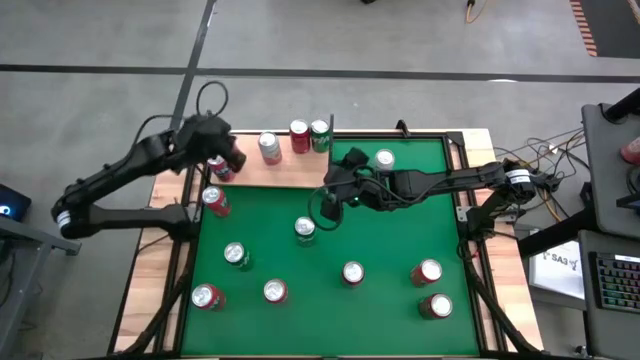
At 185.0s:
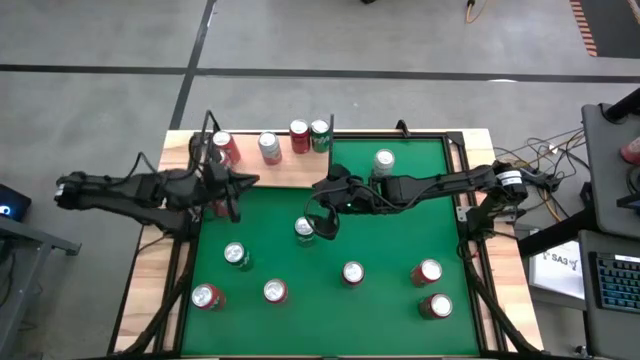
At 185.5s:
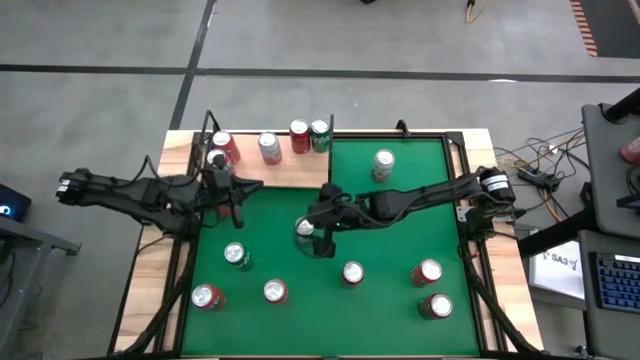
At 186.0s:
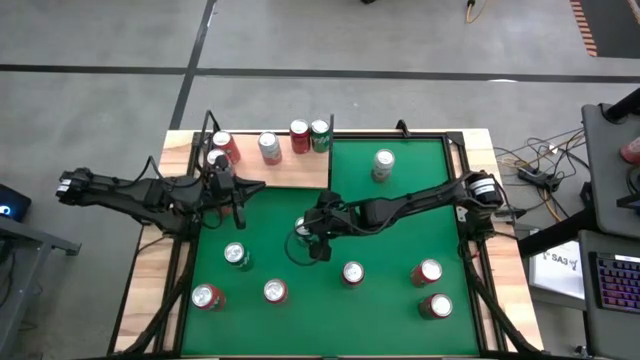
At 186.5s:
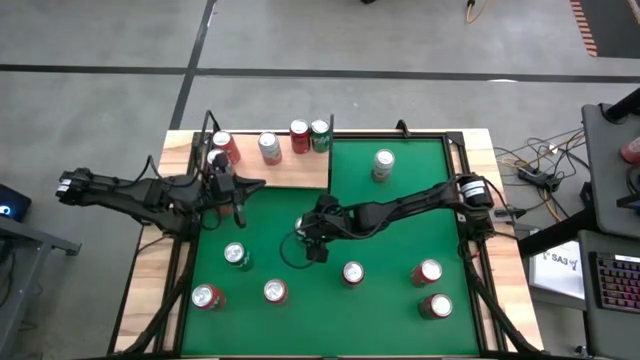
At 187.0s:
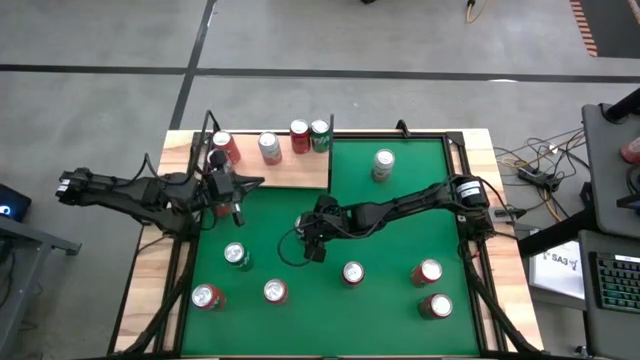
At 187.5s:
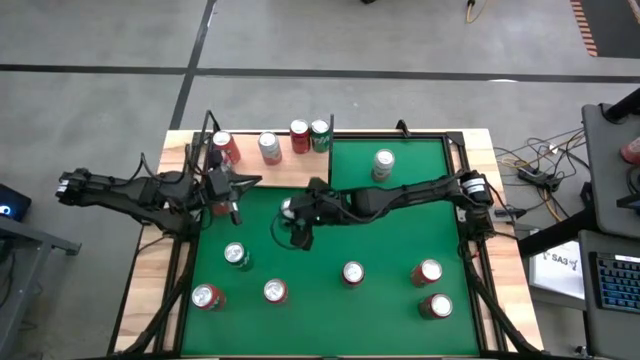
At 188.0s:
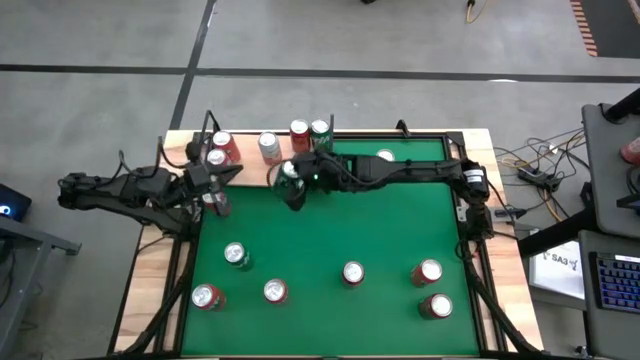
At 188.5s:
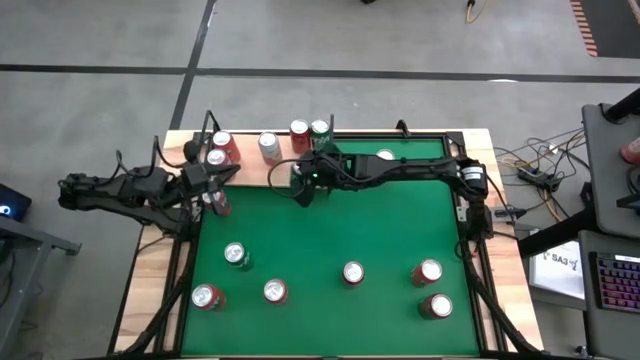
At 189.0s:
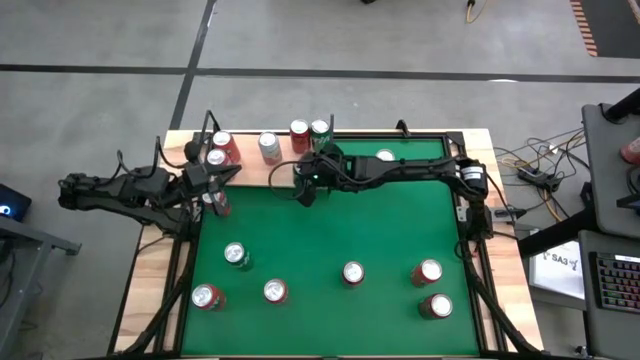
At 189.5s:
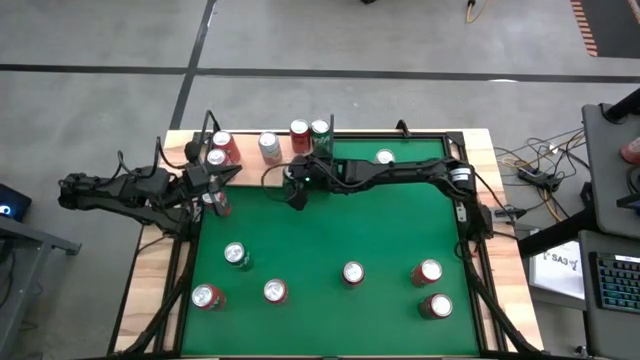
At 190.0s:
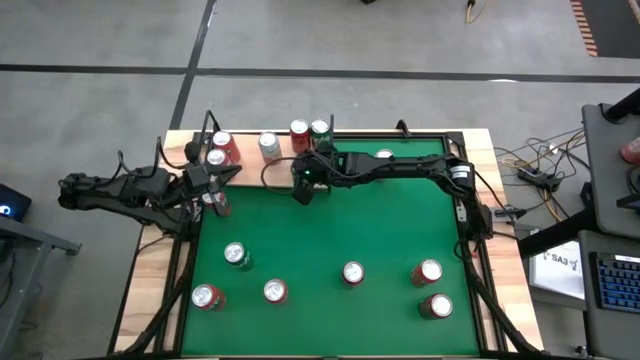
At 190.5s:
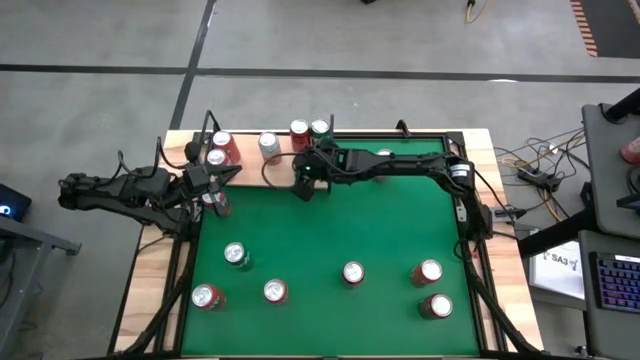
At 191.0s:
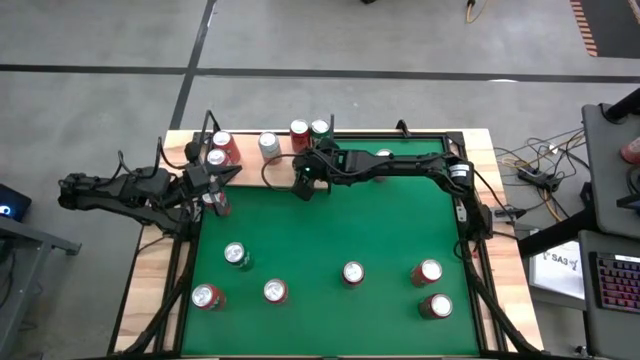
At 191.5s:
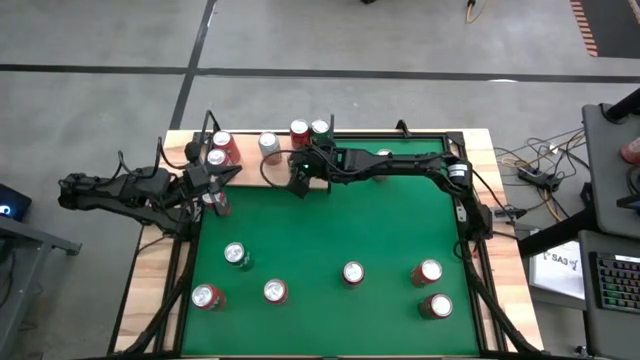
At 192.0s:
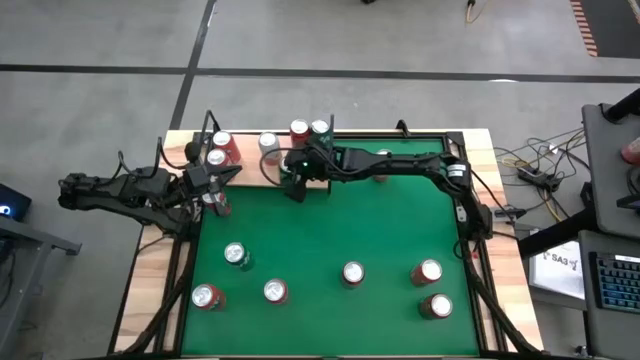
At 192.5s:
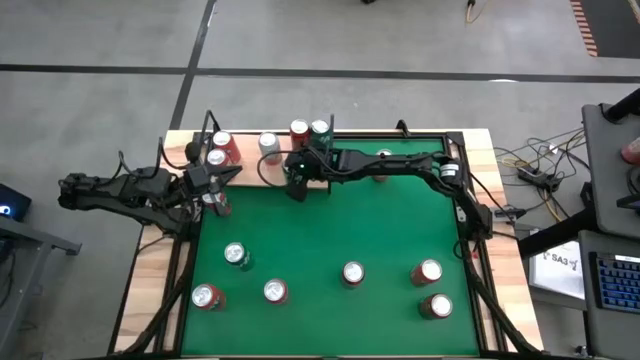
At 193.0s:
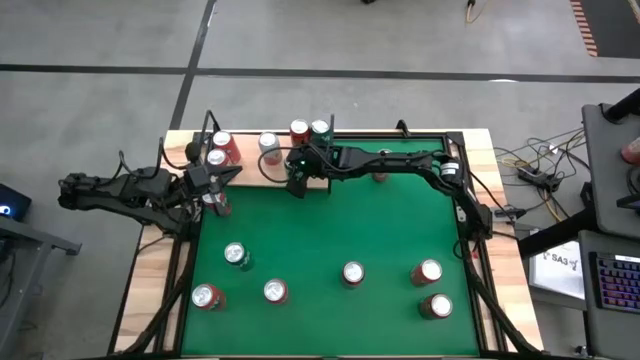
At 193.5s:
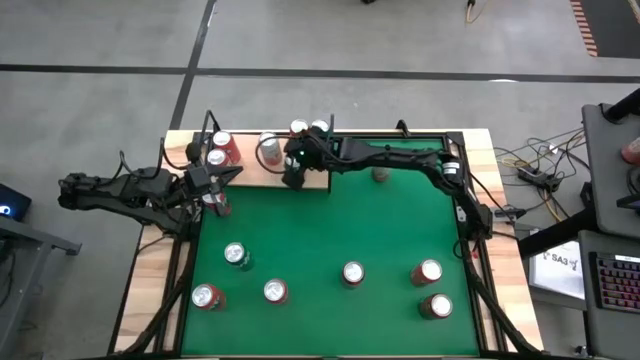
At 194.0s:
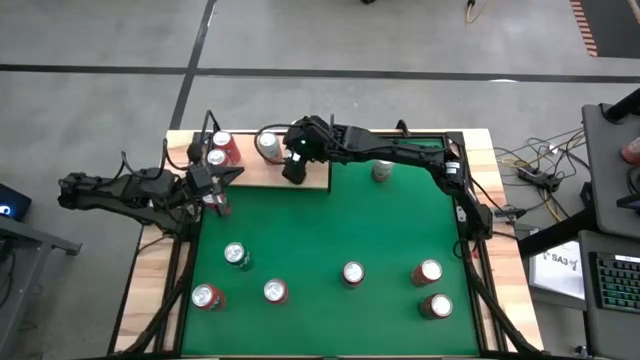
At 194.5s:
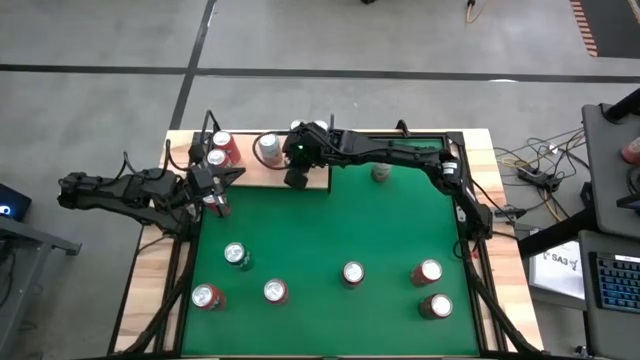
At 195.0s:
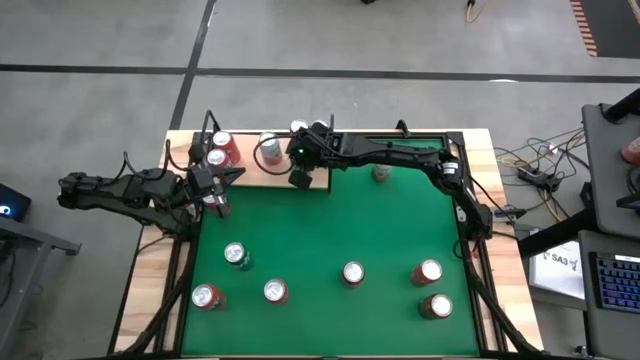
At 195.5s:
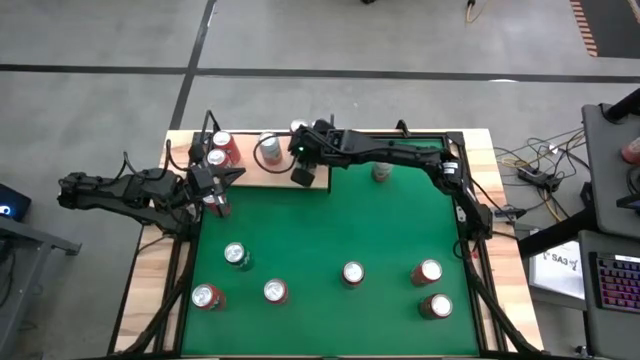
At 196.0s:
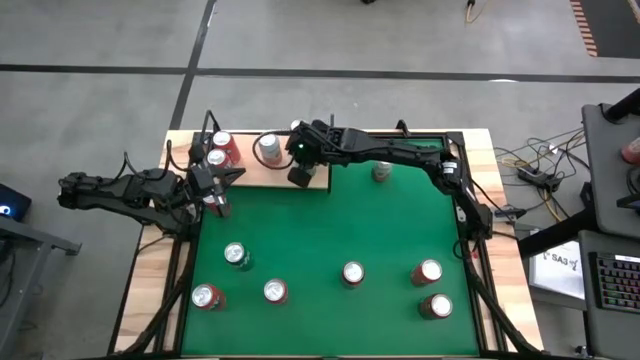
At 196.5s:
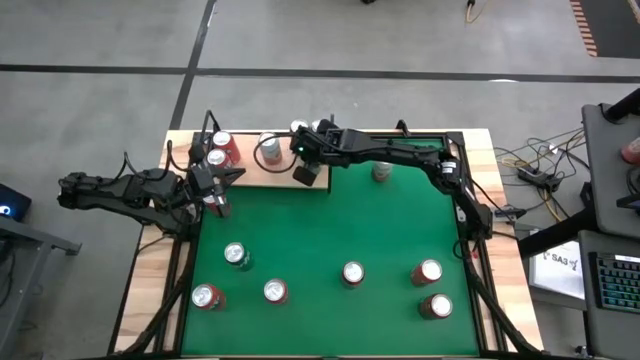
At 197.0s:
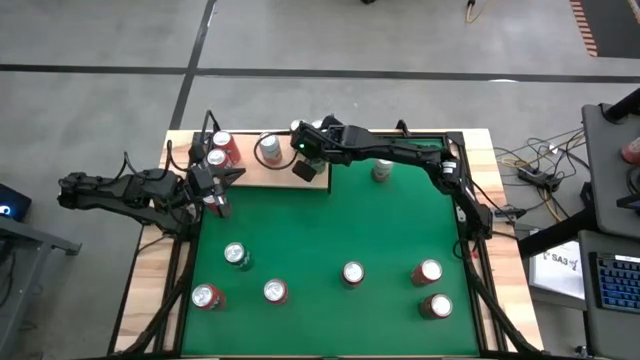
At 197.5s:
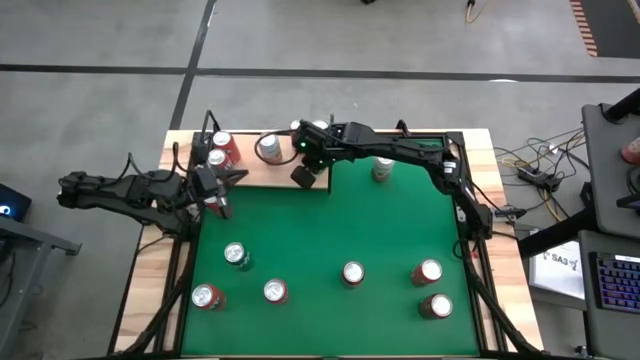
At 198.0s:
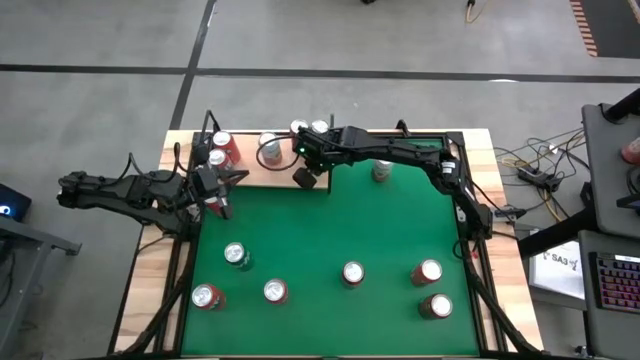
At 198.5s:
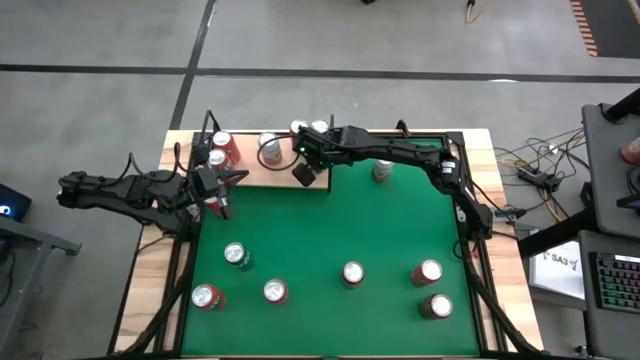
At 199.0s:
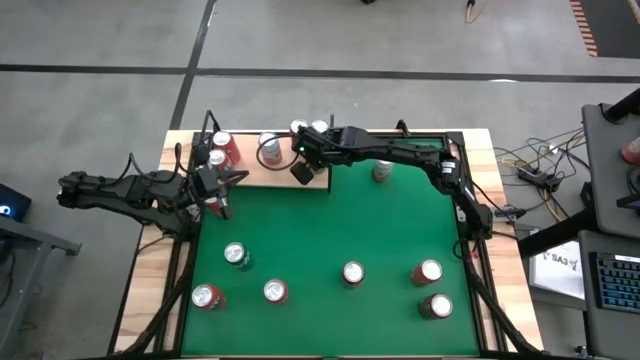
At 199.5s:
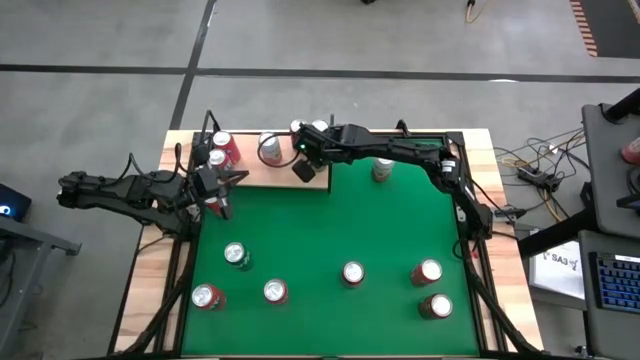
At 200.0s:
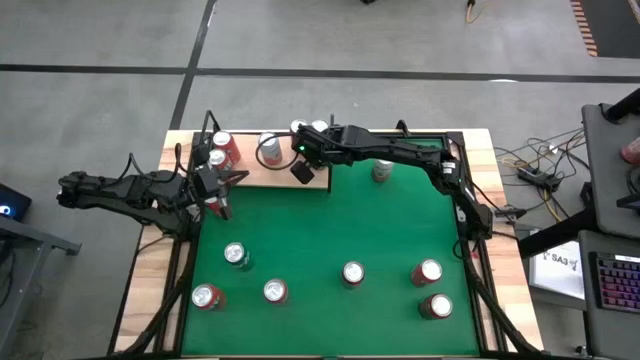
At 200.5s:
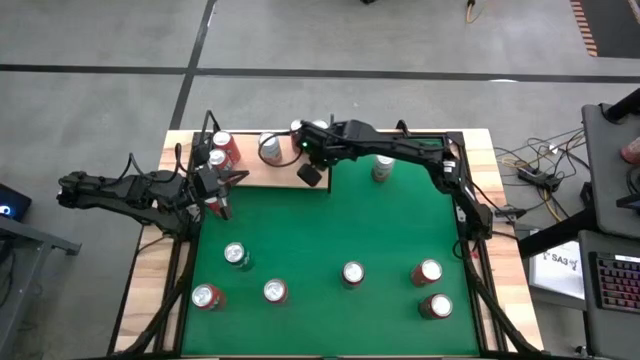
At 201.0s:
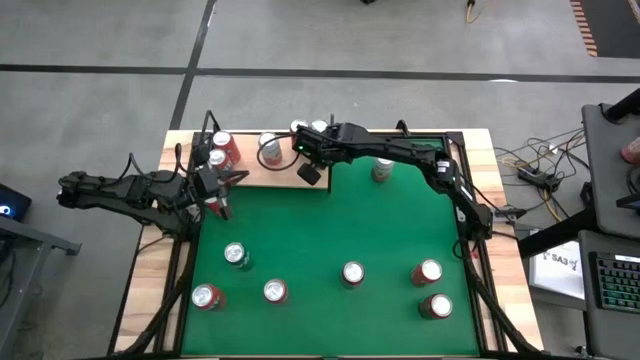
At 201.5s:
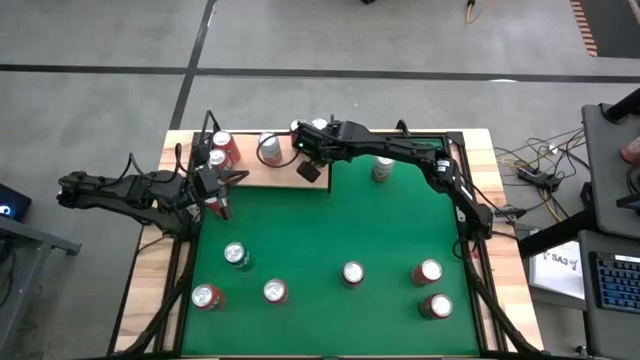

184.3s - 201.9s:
Task: Place canned beverage on shelf
Put the green soda can on the shelf aligned with the other green soda can

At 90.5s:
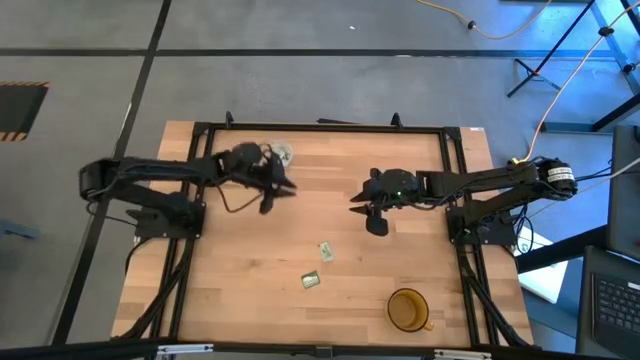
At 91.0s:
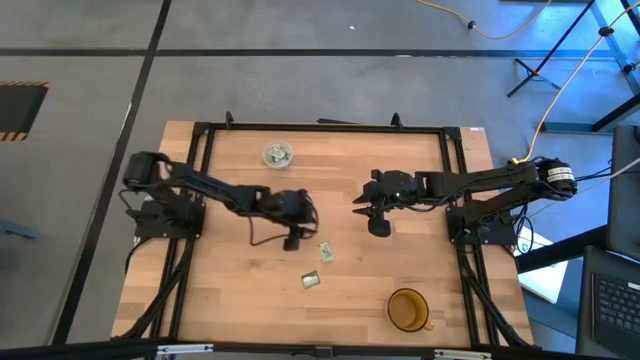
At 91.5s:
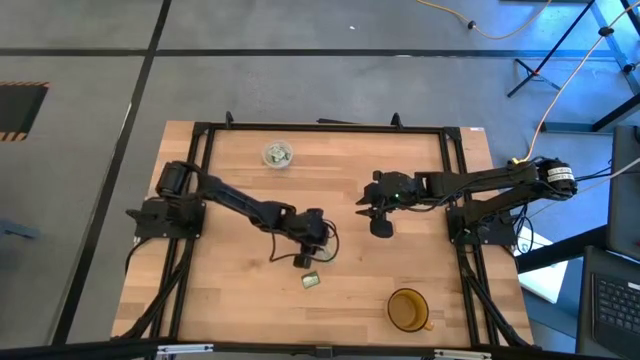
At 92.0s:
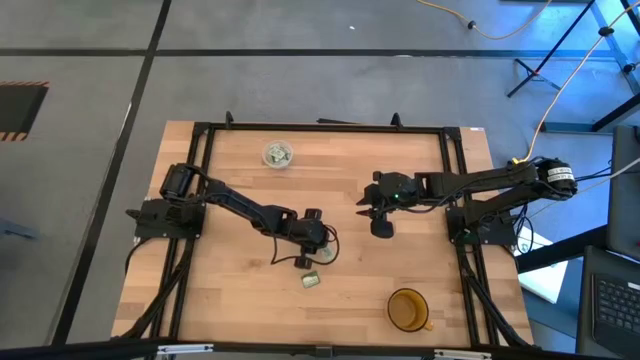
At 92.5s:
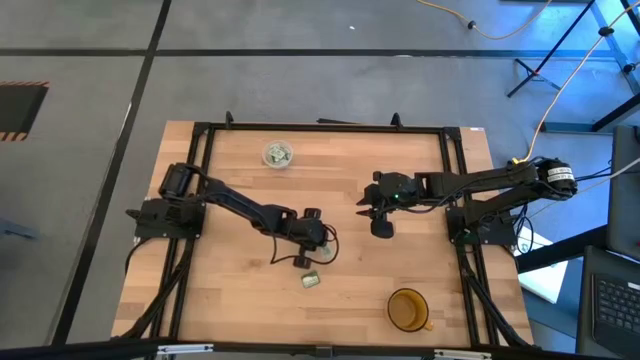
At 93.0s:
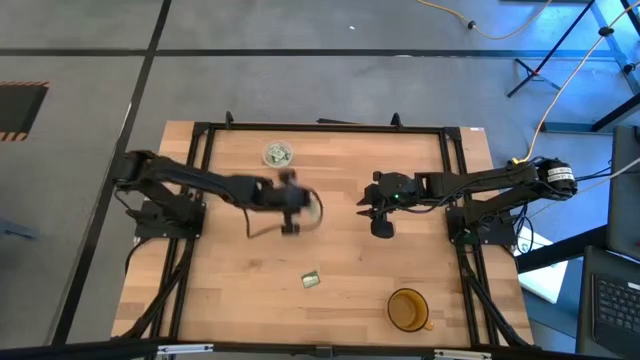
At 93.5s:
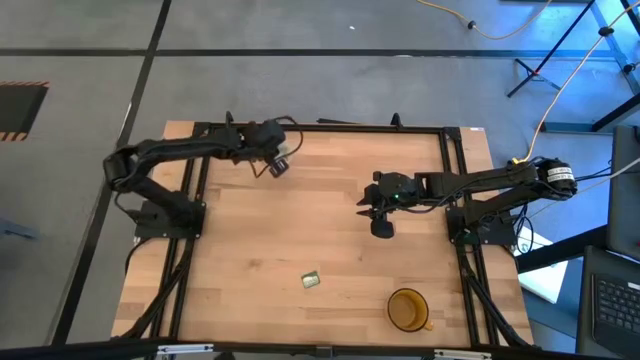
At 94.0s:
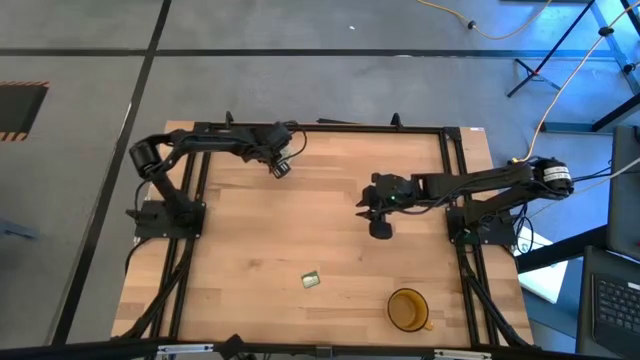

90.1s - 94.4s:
Task: Pick and place Stevia / Truvia into bins
Put the stevia packet into the transparent container
